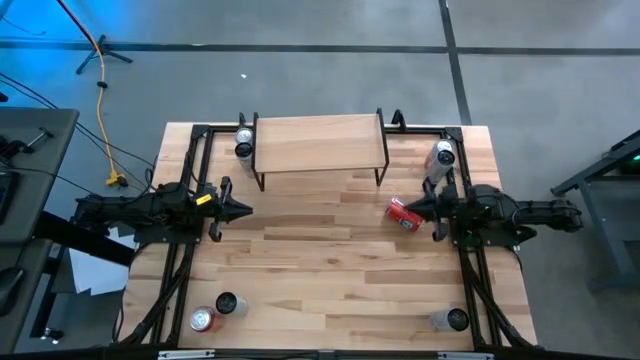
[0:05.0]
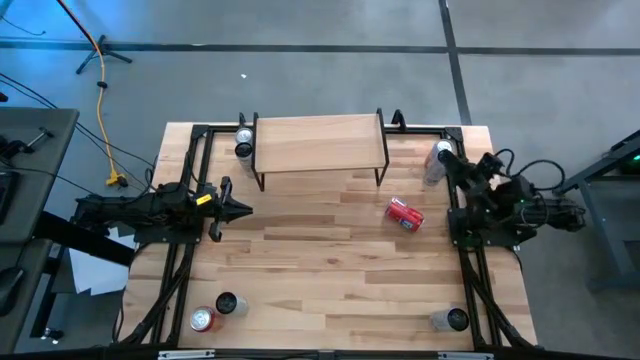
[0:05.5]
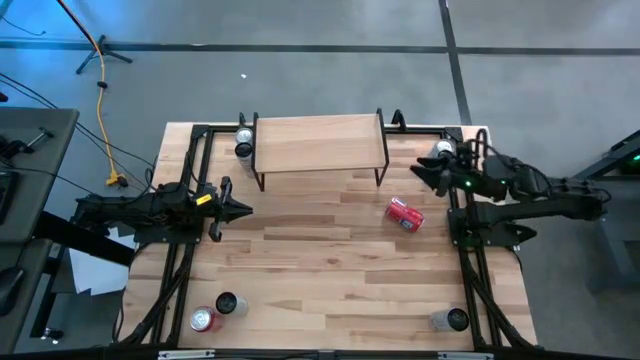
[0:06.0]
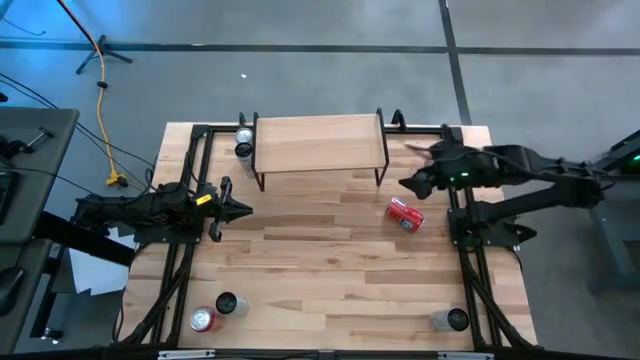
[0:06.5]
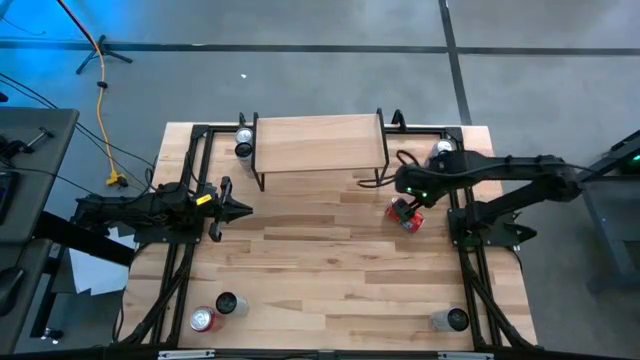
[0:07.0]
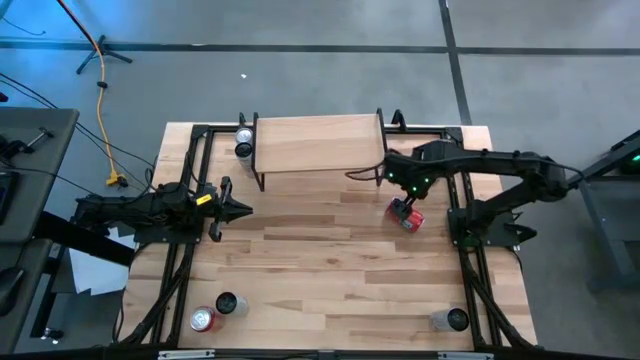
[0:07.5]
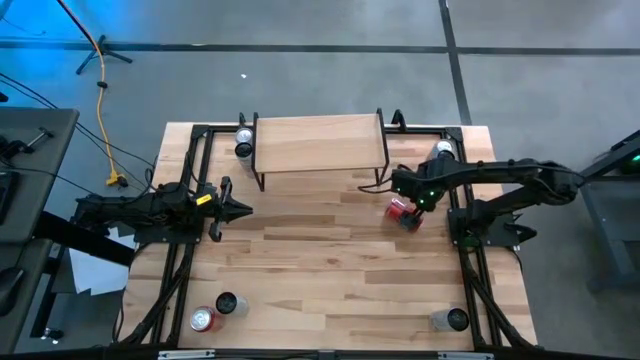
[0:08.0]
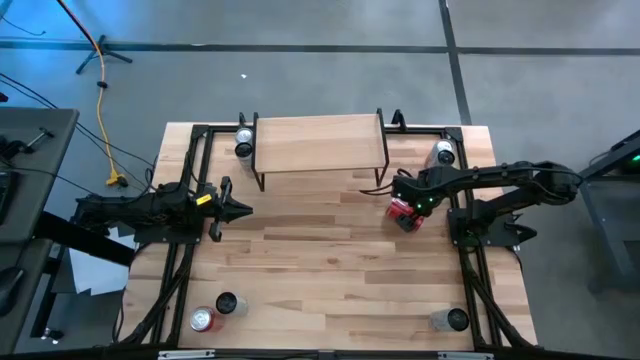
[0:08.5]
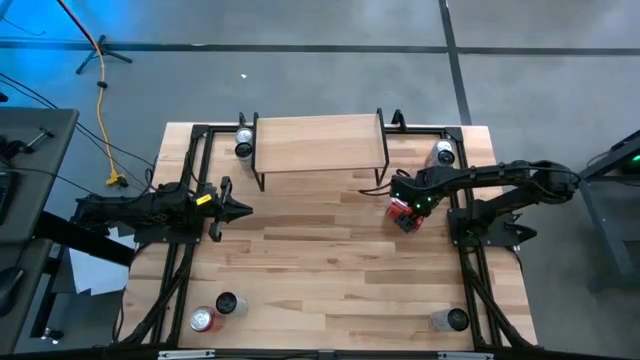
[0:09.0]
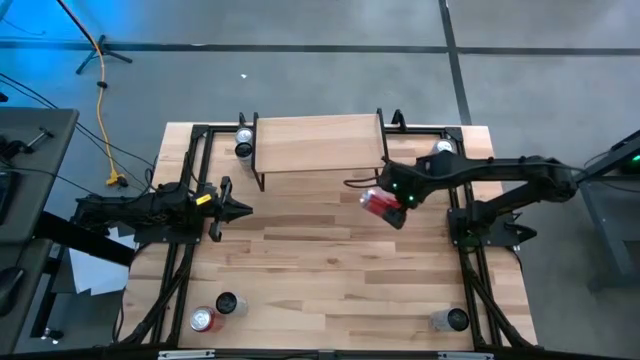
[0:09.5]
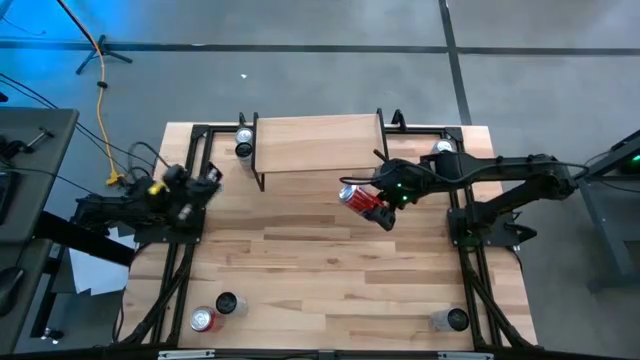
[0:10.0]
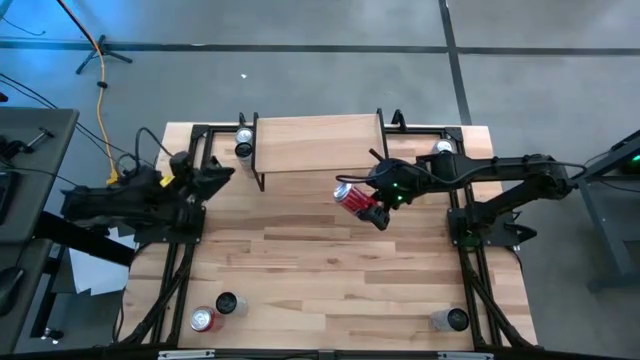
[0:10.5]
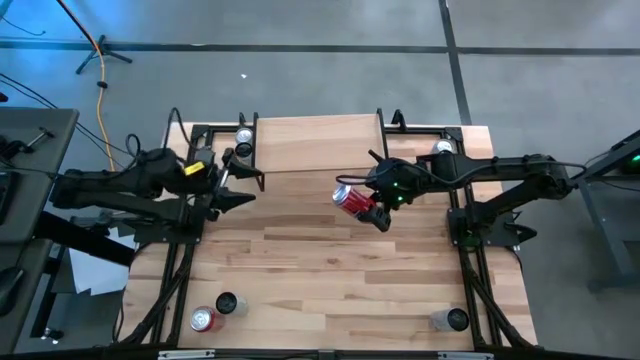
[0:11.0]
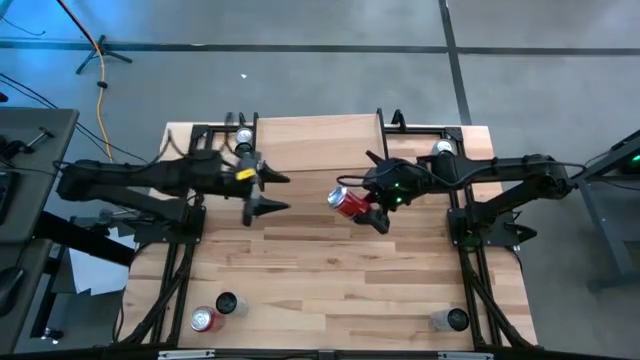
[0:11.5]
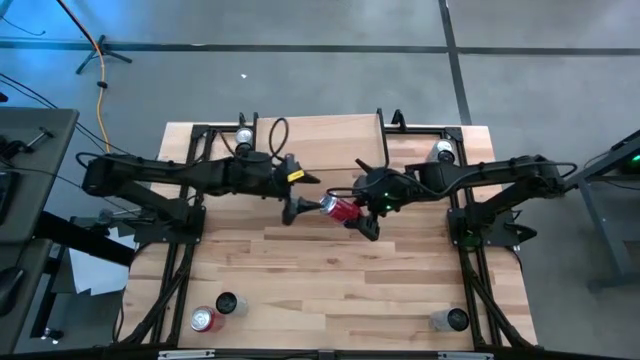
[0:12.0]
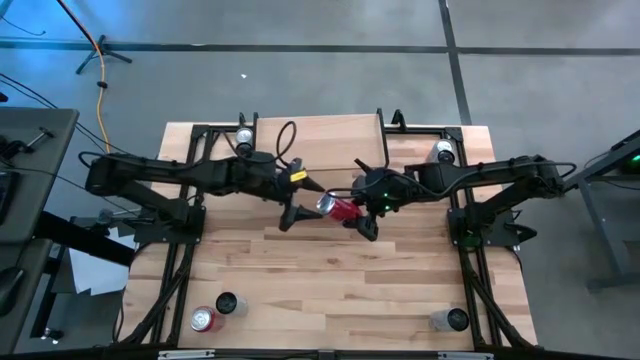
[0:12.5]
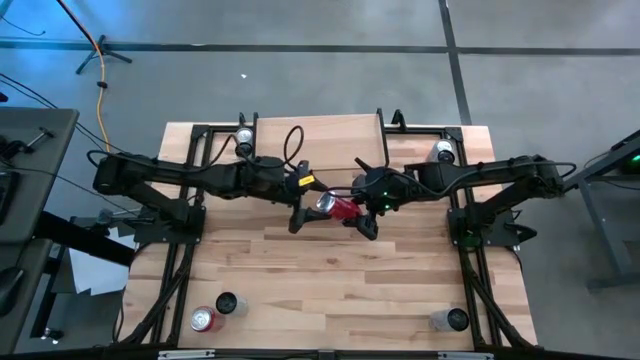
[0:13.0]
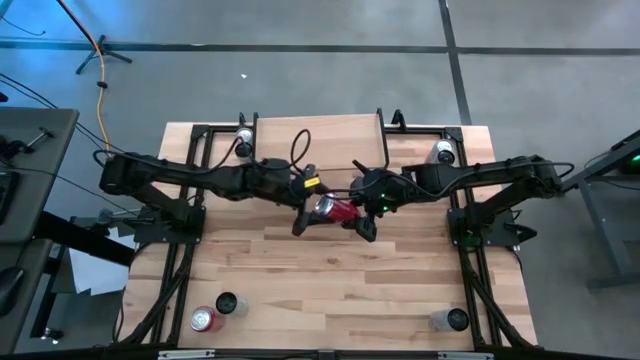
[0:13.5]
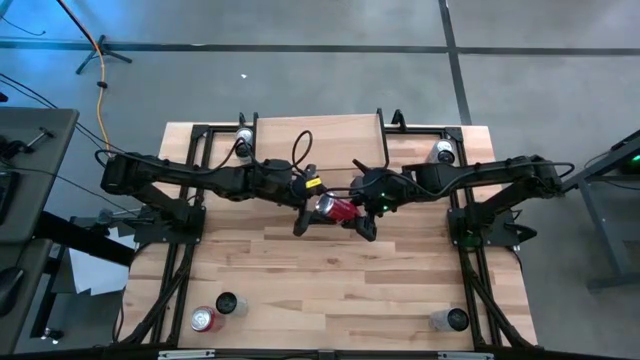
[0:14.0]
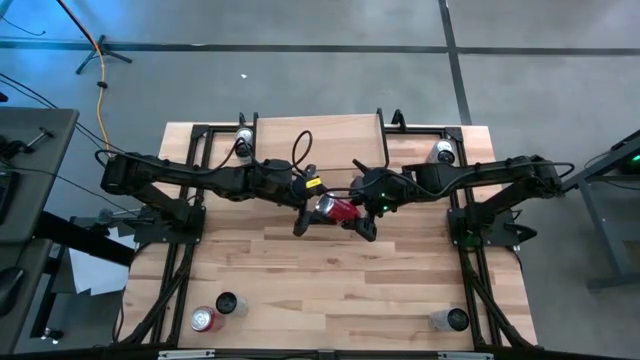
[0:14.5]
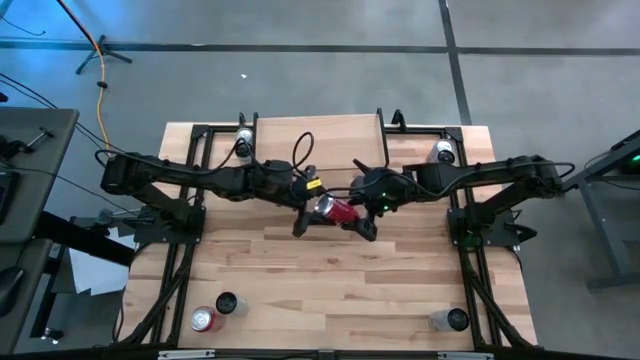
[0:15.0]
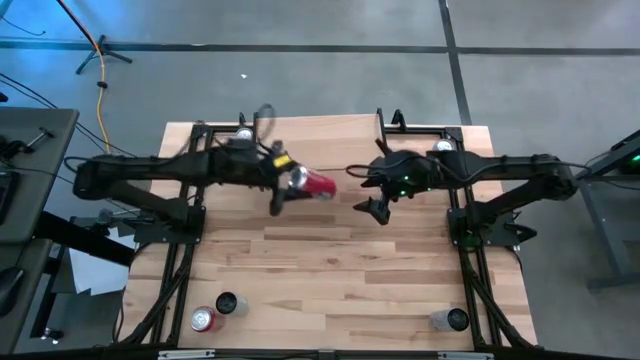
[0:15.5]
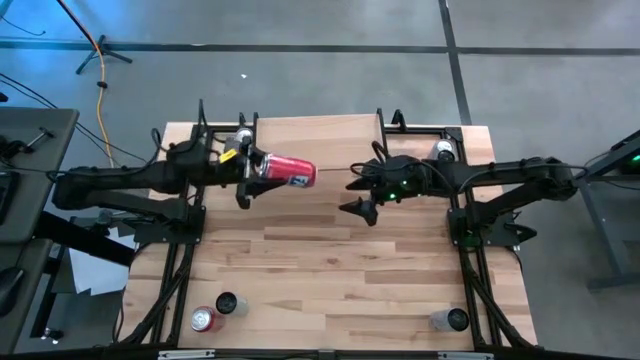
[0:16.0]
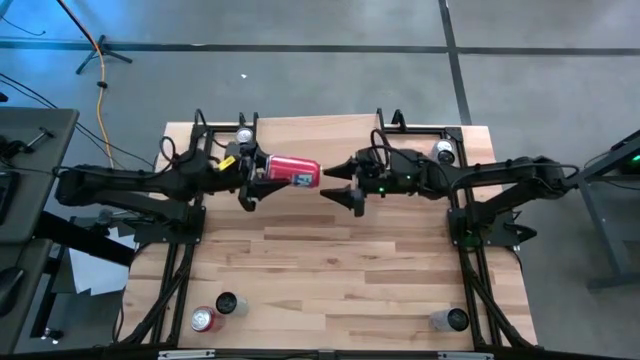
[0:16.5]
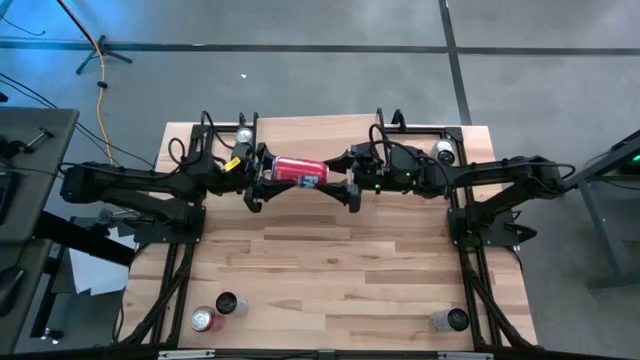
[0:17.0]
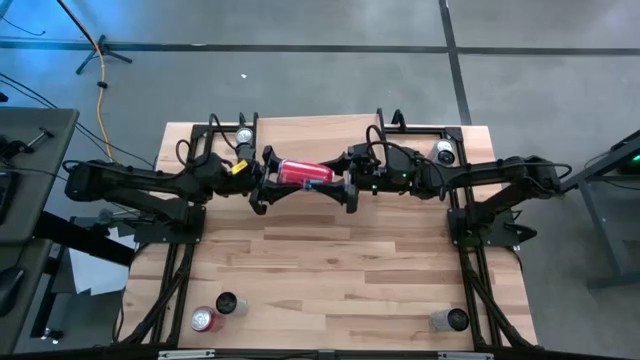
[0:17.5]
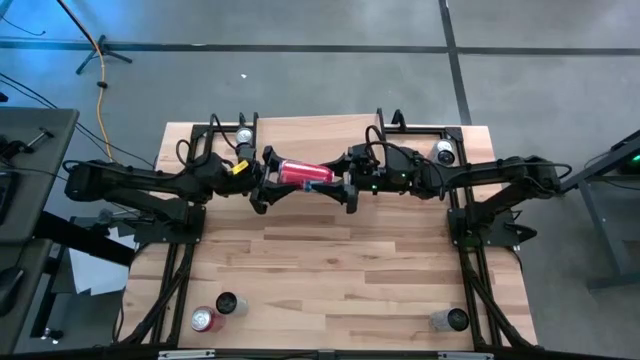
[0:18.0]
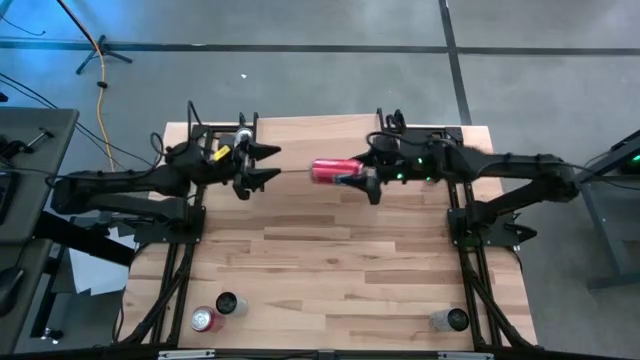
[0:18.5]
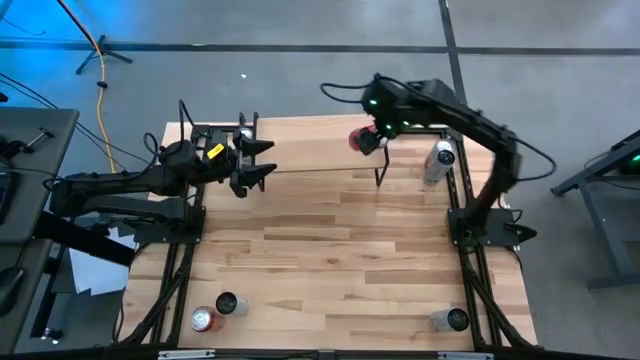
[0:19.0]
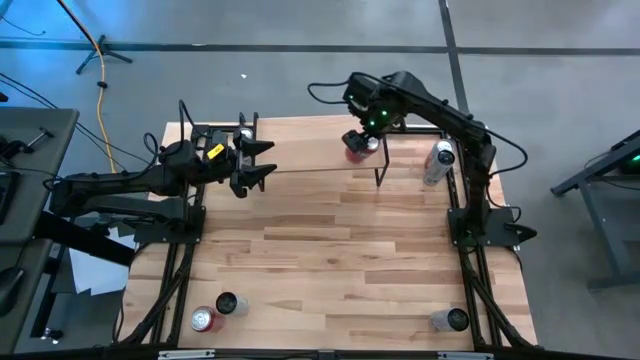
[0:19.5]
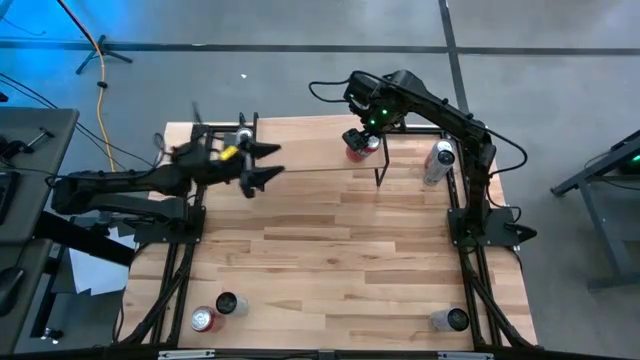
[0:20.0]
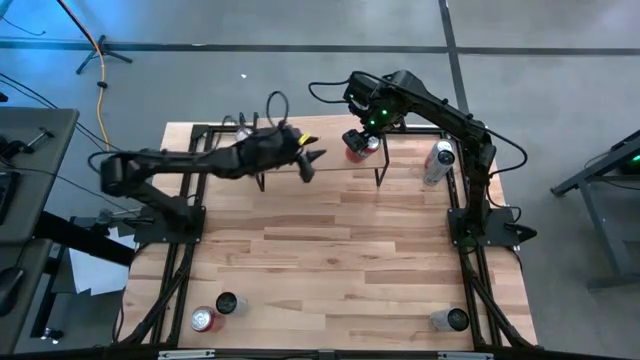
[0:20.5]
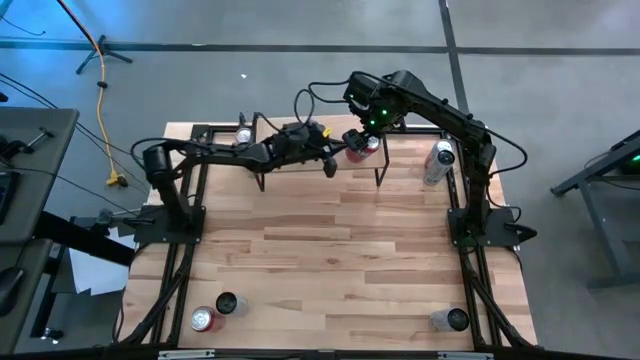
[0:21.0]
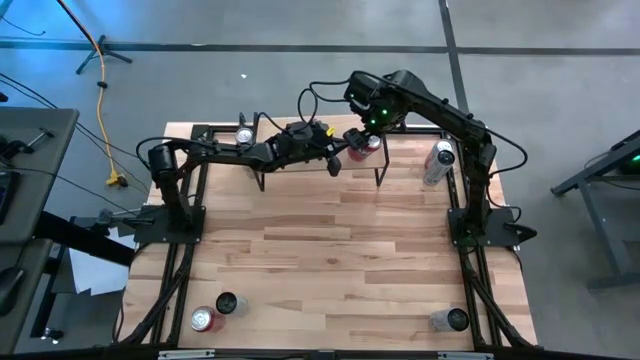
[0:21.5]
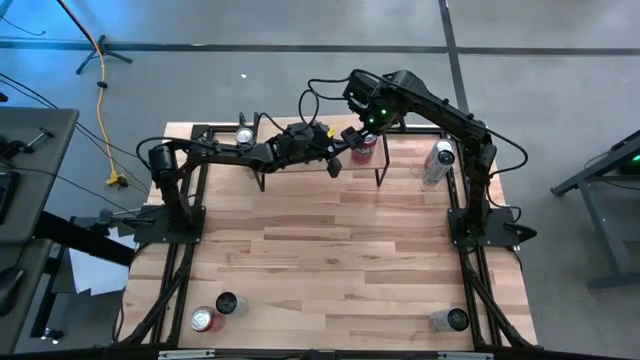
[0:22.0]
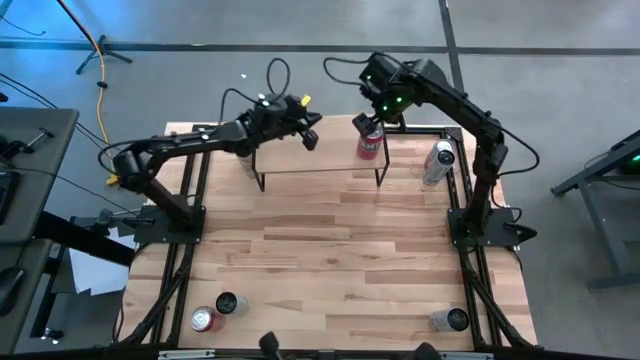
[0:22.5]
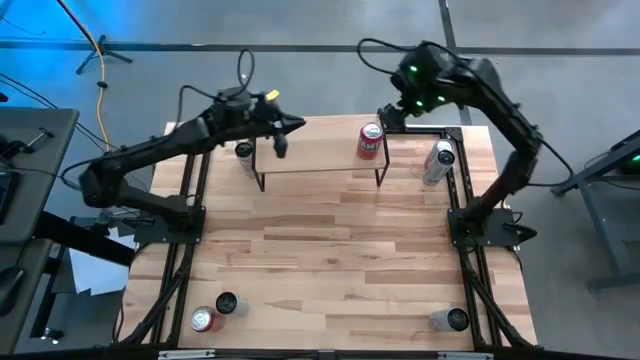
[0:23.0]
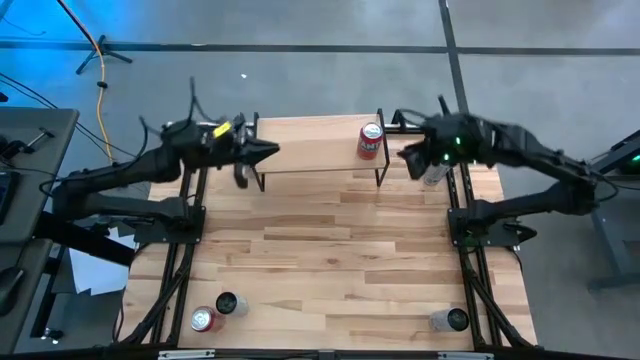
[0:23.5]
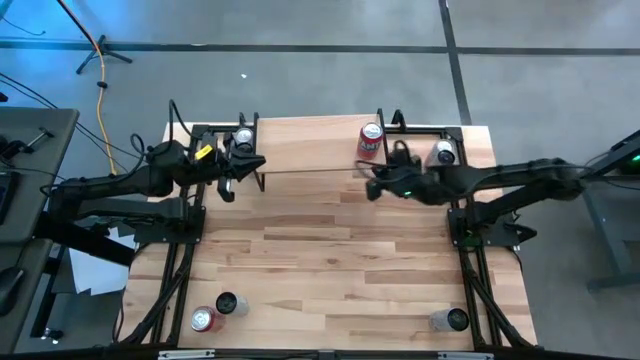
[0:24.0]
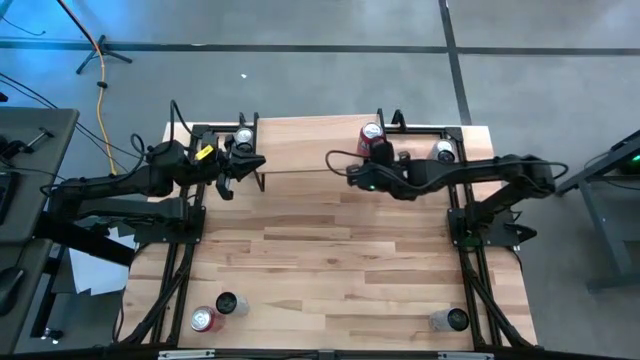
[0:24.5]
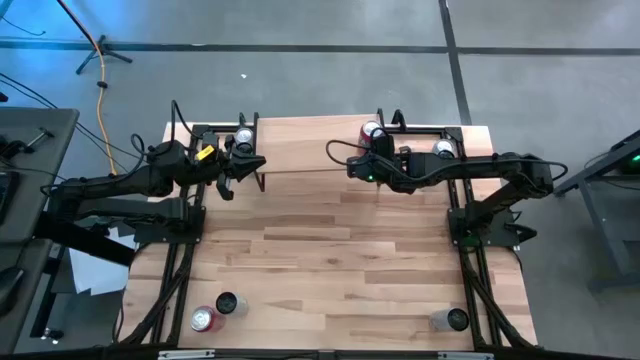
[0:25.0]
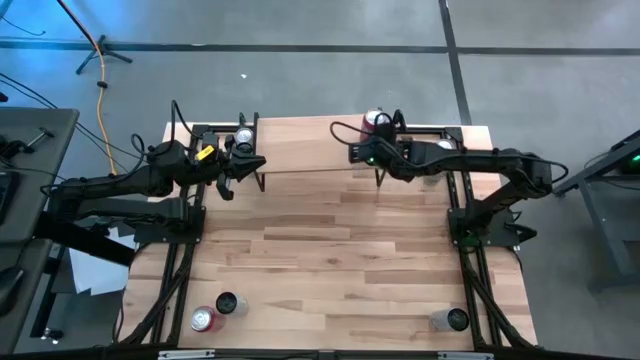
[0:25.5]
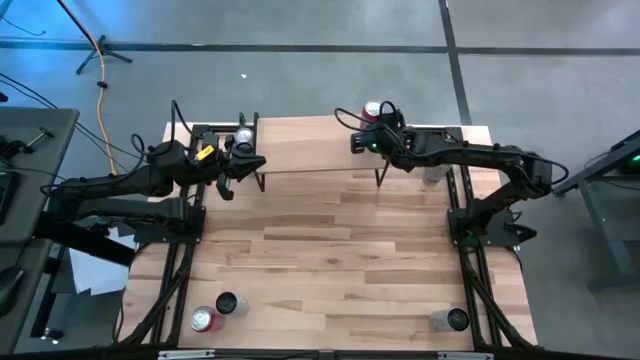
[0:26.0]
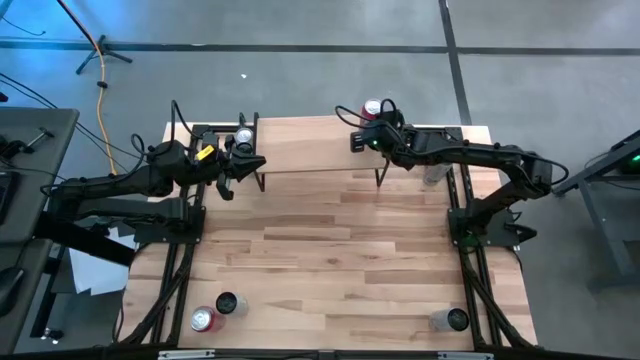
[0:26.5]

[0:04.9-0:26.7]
Task: Place canned beverage on shelf
Put the top orange soda can on the shelf
